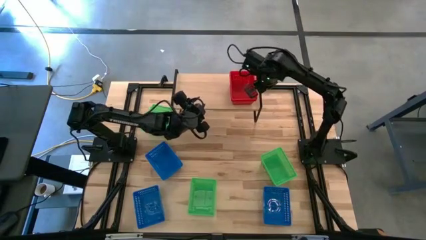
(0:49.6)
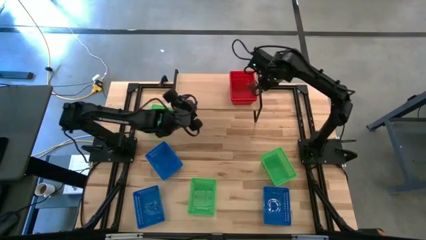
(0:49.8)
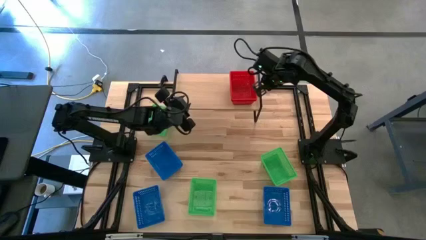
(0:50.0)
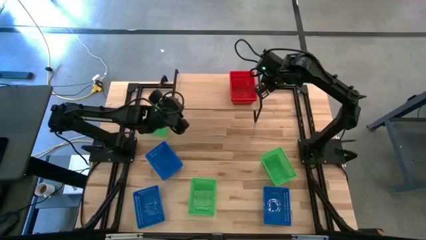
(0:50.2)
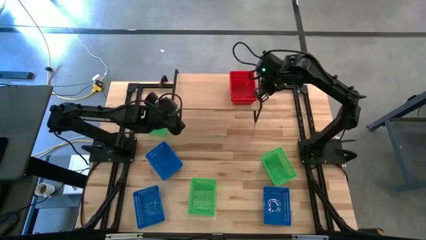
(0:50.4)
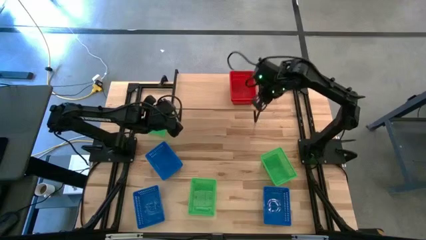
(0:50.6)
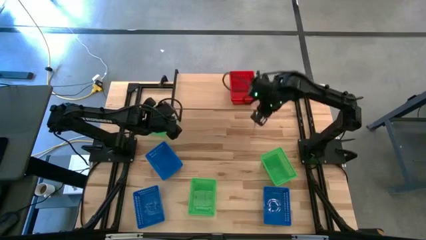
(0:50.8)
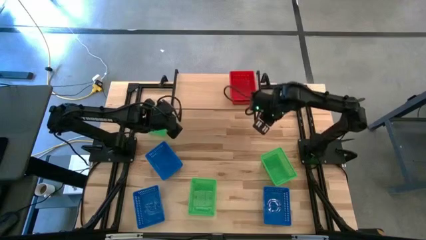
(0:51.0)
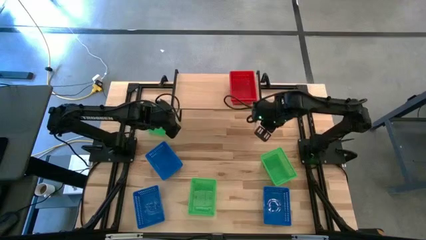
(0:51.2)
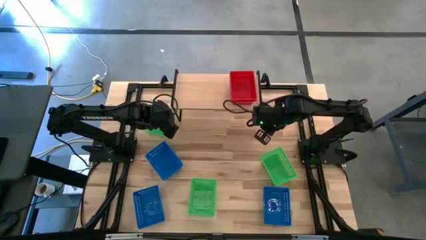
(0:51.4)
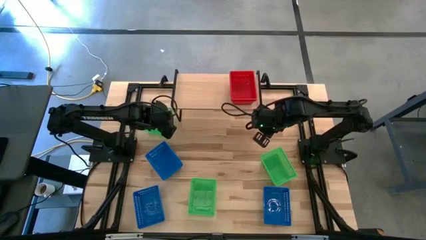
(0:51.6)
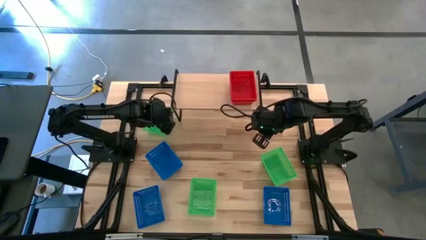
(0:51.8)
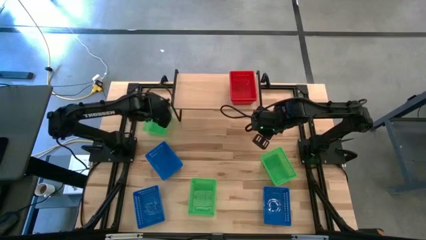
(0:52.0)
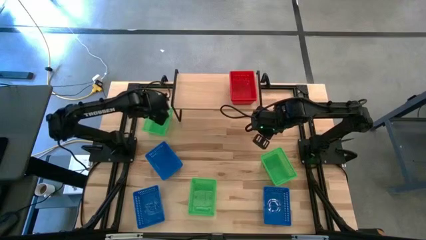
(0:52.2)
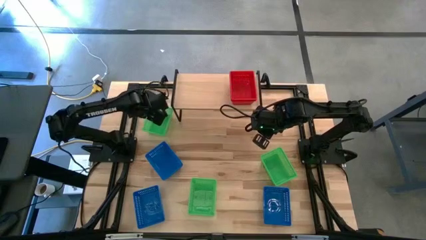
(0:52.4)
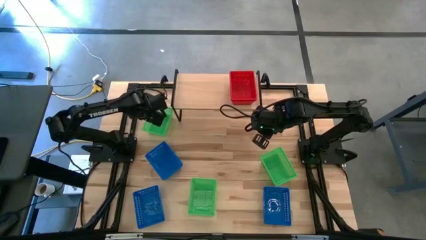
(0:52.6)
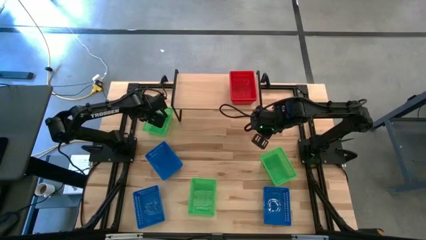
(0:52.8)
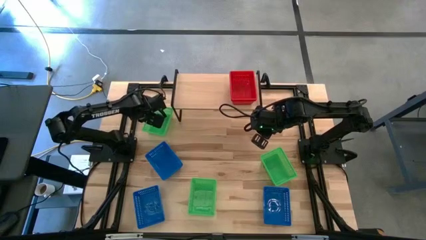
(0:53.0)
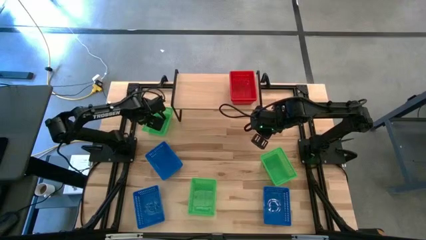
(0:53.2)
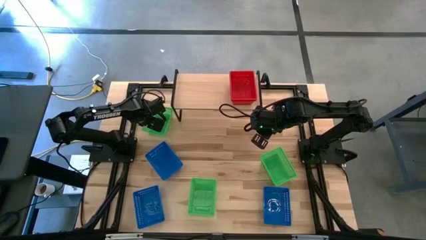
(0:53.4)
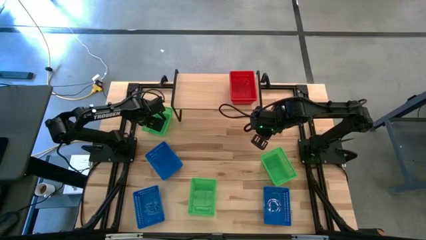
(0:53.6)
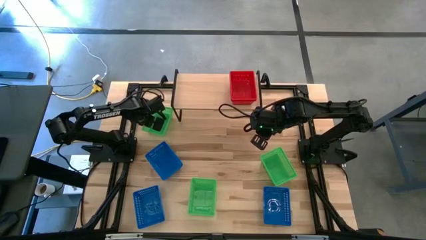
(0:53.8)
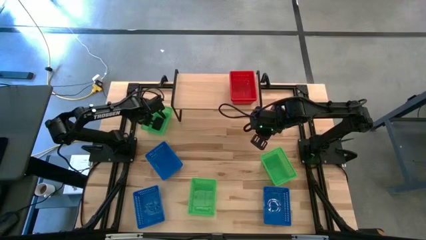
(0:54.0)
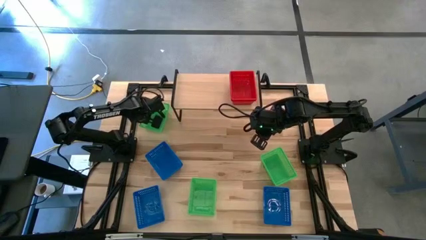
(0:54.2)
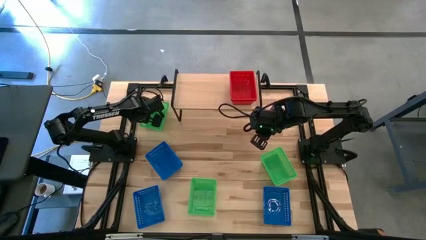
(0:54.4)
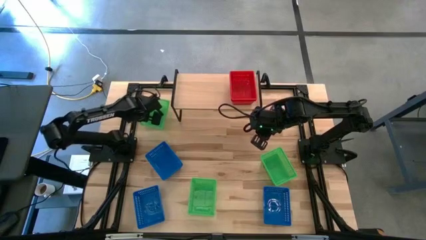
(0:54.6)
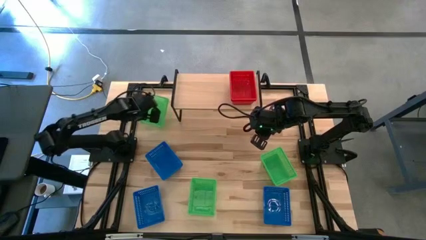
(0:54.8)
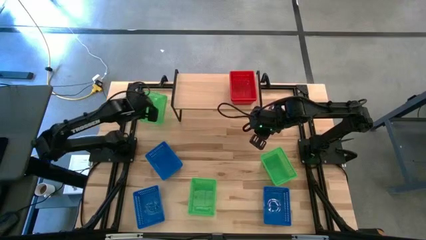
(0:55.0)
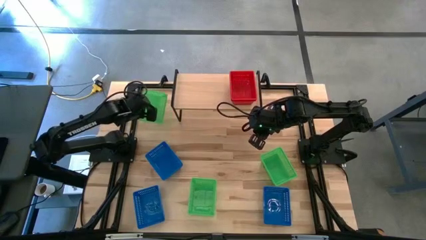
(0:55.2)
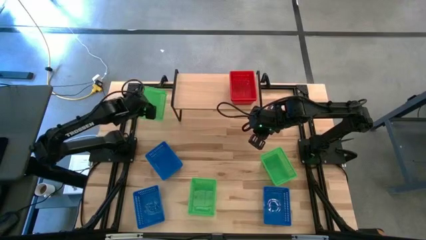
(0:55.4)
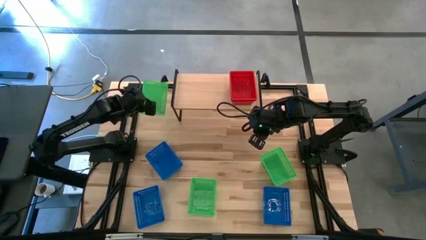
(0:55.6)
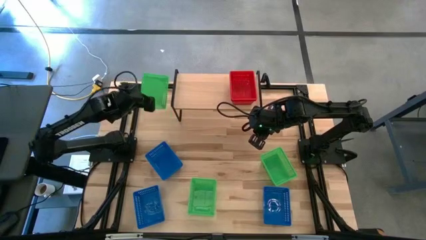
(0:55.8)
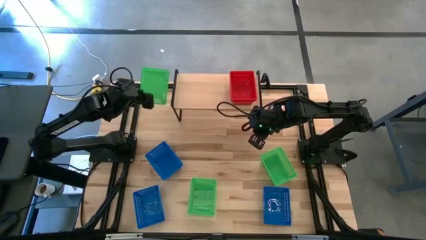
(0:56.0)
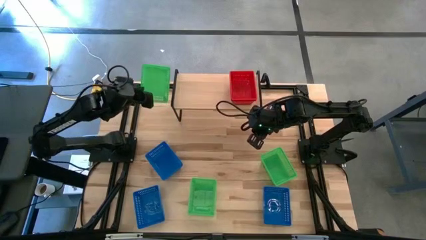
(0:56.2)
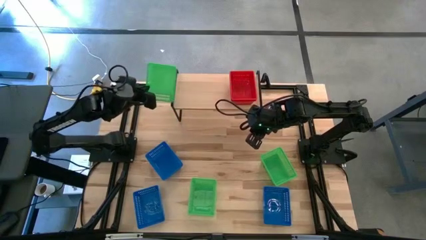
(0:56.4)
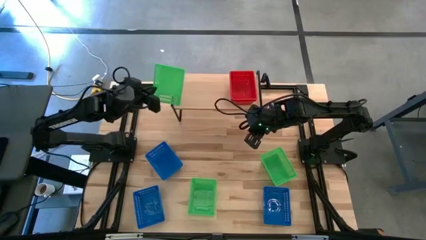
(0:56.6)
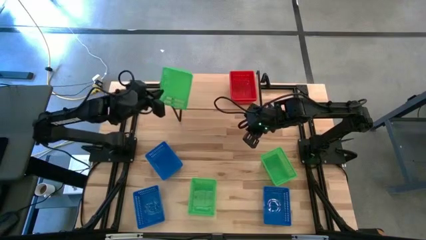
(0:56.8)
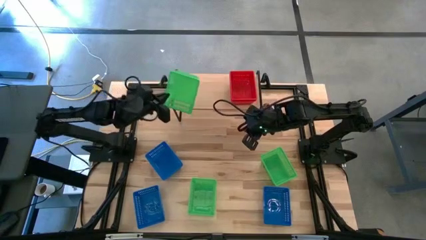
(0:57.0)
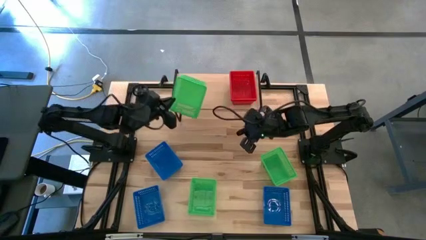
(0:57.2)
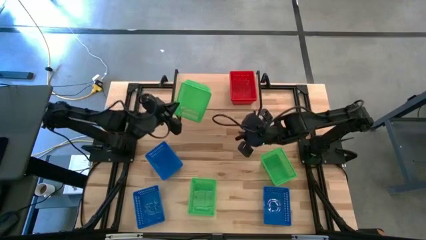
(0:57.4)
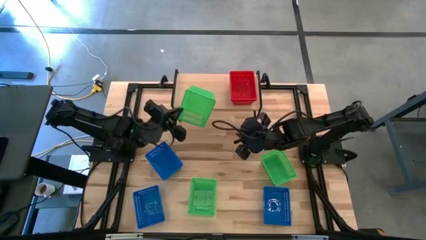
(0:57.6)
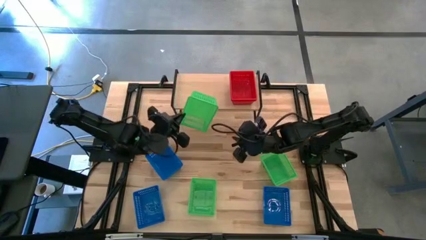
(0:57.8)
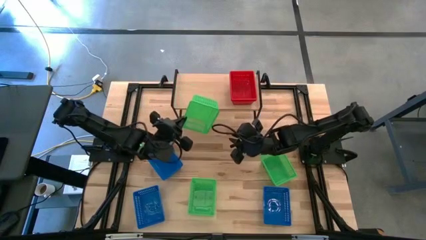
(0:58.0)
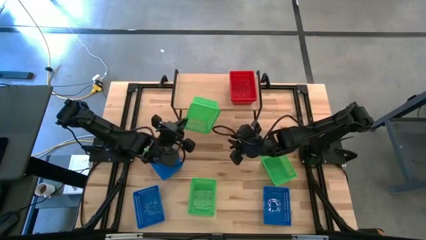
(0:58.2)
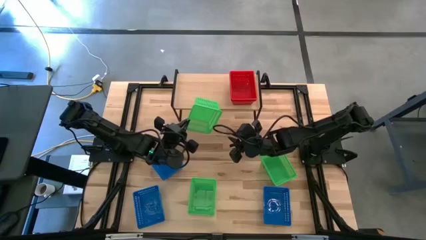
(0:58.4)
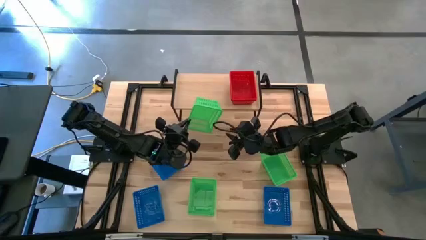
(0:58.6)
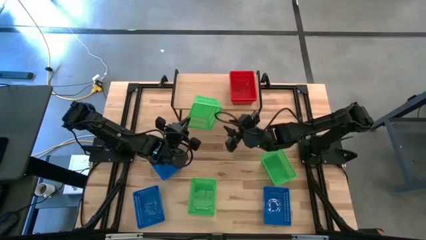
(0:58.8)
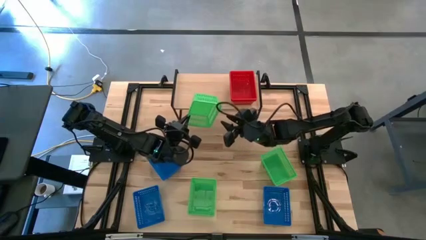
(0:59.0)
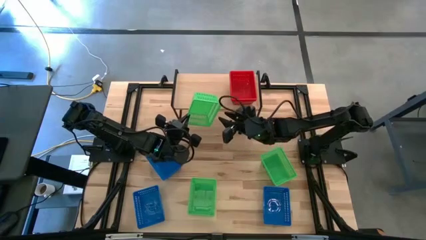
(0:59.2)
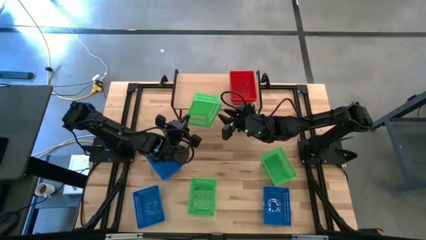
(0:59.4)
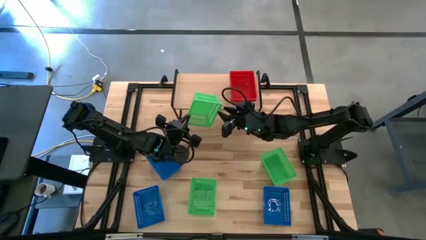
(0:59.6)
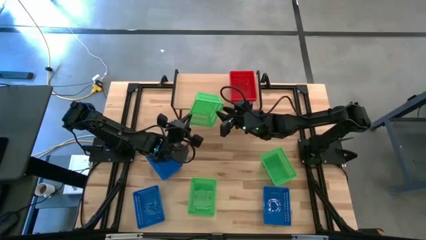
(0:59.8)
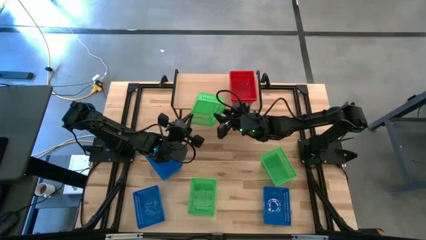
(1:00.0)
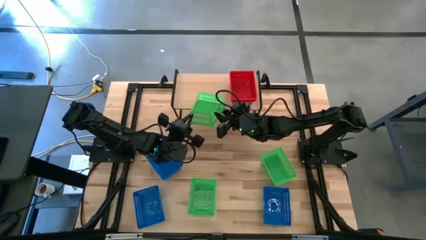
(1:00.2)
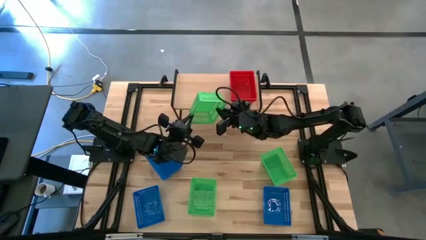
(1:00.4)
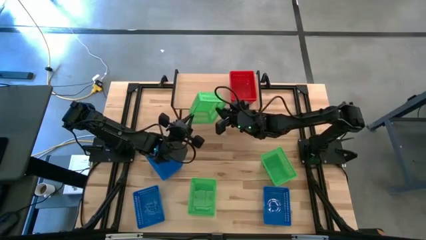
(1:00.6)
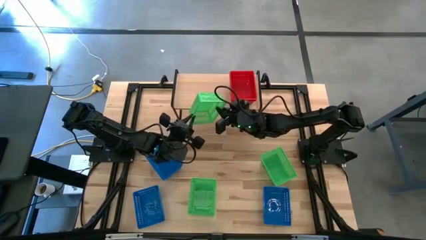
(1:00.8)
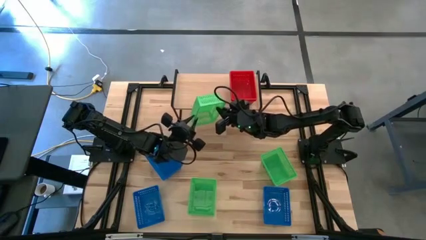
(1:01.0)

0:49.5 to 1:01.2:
Task: Stack baskets on shelf by color
Stack the top left green basket on the top of the right green basket
